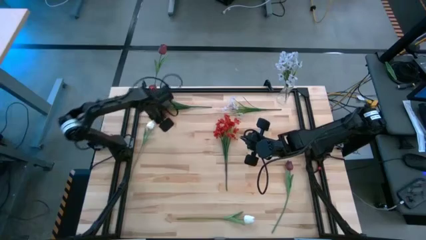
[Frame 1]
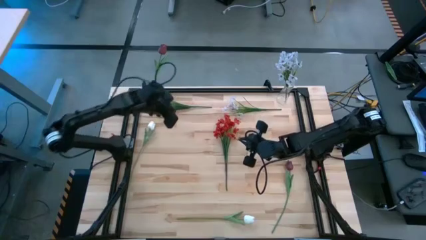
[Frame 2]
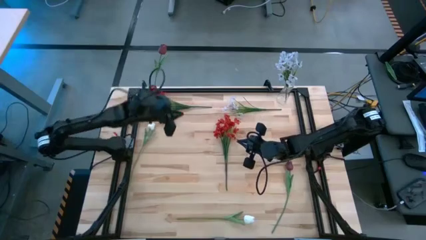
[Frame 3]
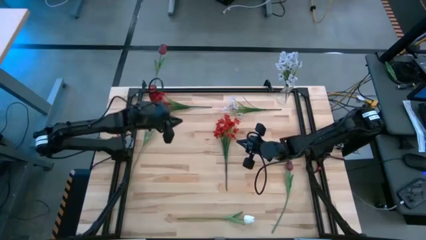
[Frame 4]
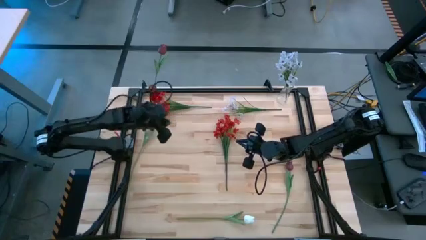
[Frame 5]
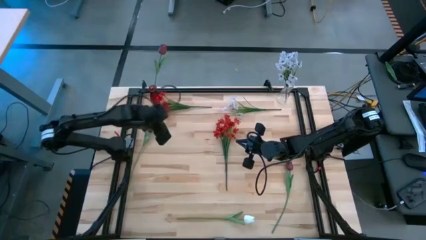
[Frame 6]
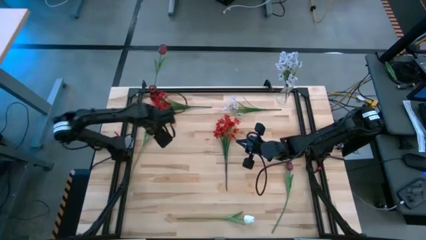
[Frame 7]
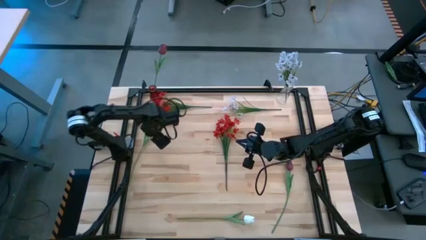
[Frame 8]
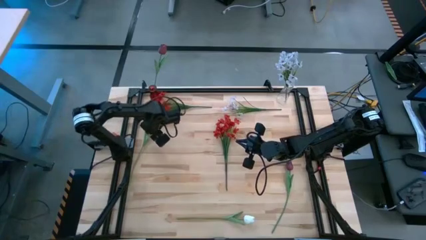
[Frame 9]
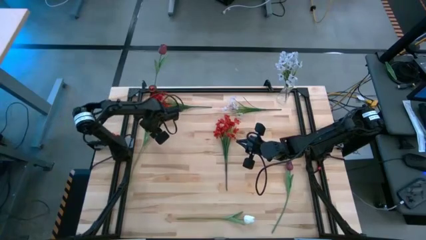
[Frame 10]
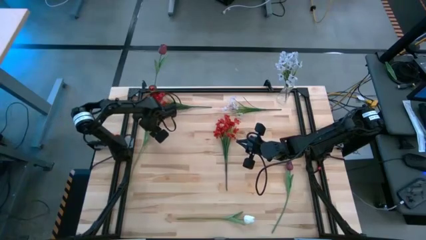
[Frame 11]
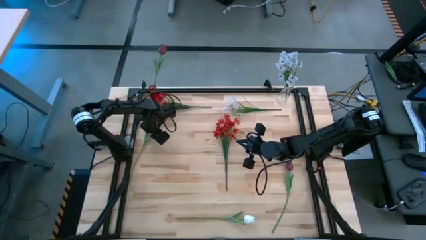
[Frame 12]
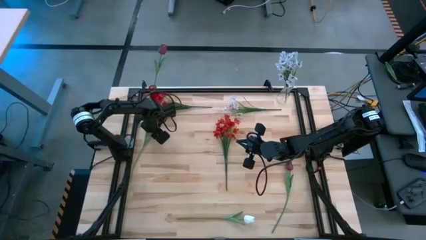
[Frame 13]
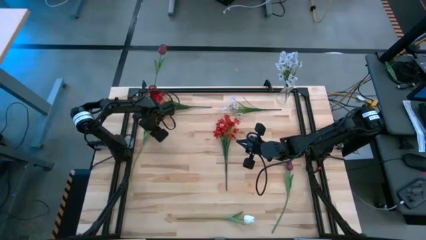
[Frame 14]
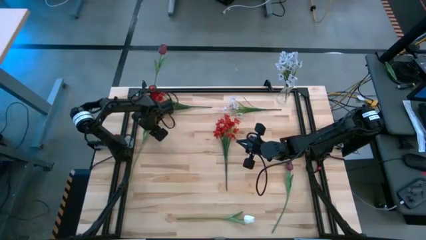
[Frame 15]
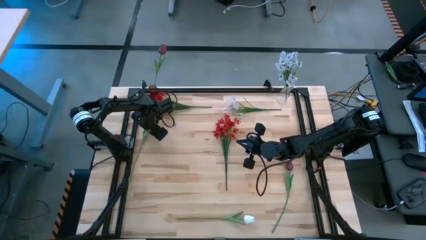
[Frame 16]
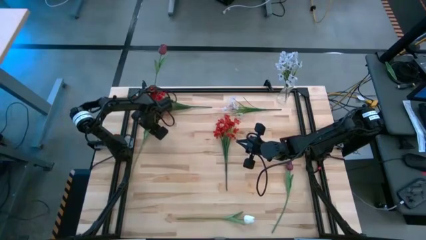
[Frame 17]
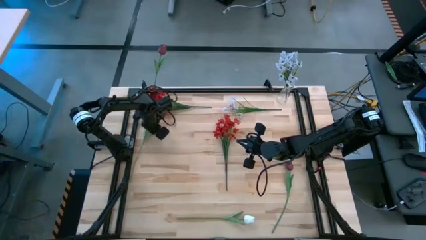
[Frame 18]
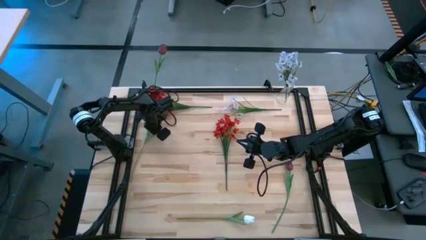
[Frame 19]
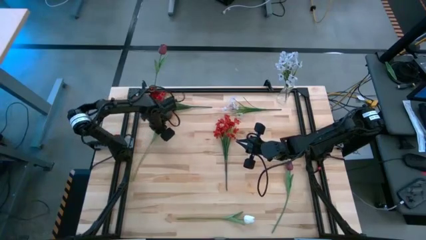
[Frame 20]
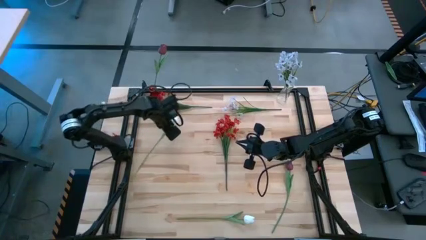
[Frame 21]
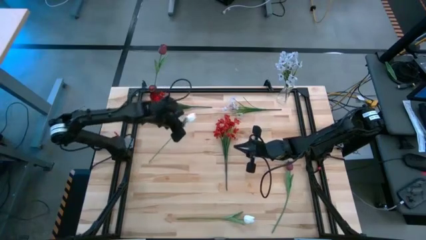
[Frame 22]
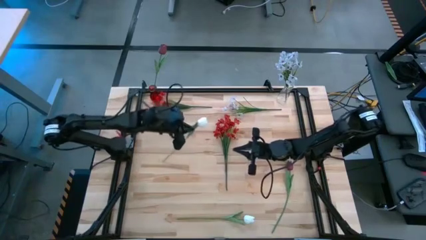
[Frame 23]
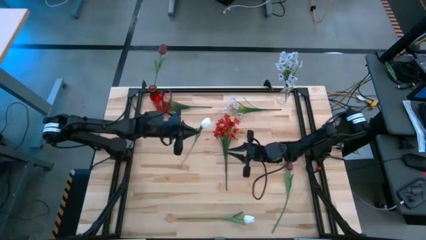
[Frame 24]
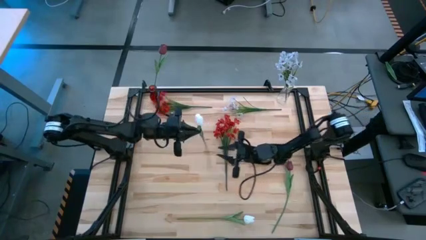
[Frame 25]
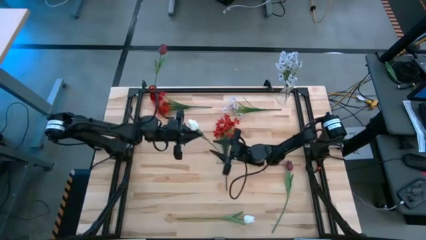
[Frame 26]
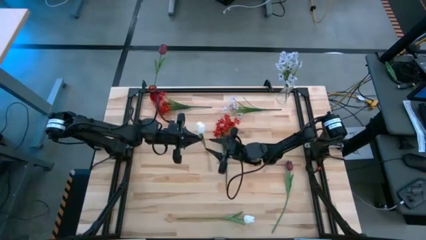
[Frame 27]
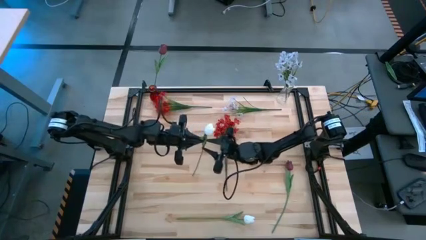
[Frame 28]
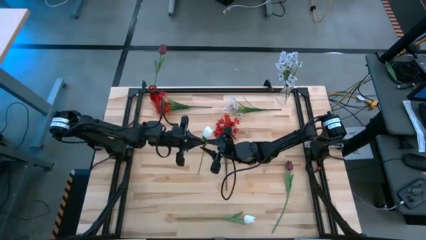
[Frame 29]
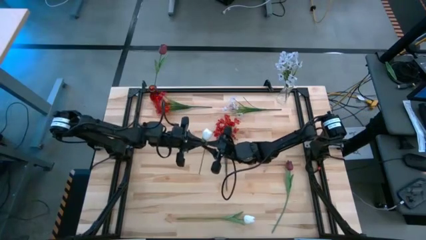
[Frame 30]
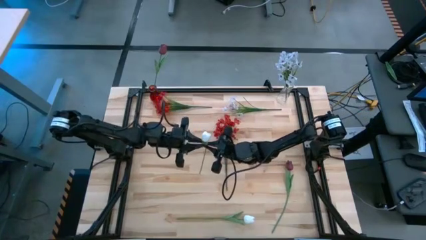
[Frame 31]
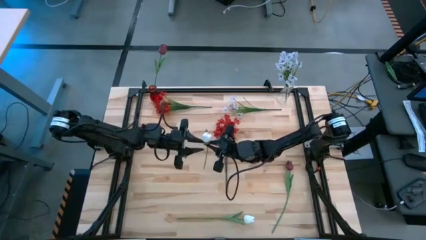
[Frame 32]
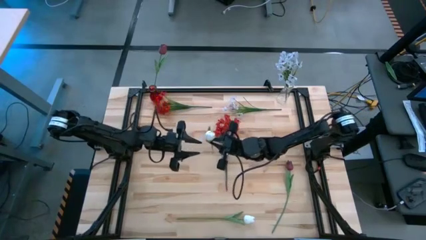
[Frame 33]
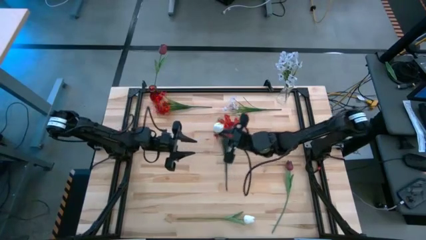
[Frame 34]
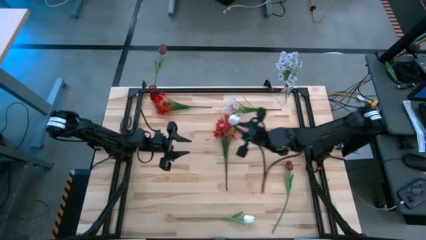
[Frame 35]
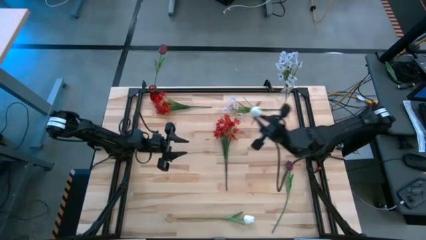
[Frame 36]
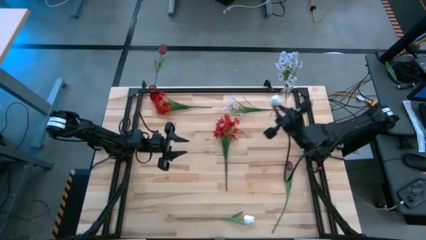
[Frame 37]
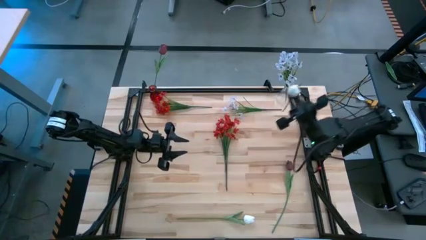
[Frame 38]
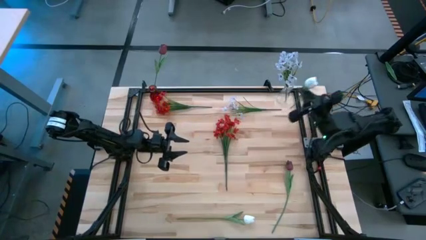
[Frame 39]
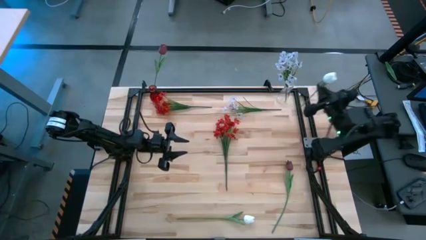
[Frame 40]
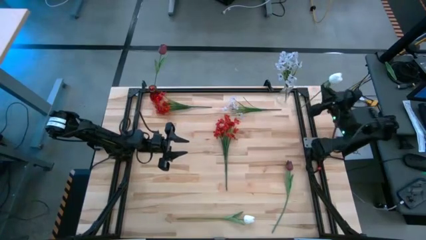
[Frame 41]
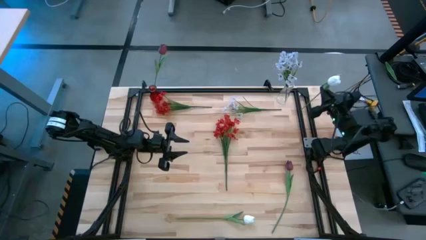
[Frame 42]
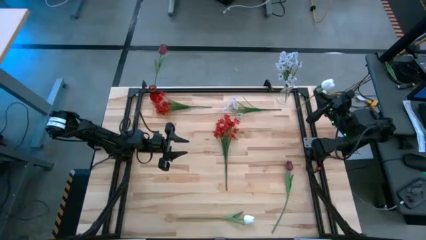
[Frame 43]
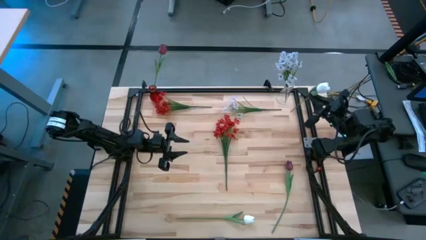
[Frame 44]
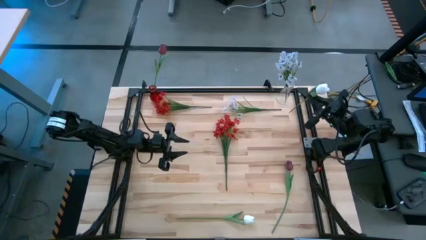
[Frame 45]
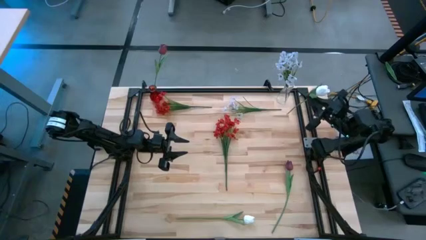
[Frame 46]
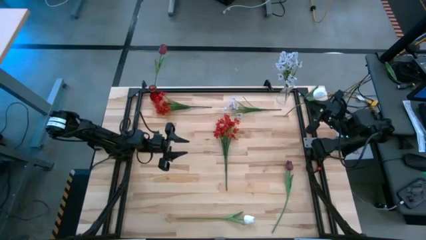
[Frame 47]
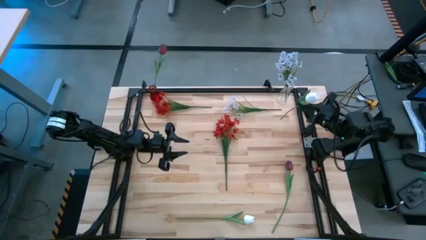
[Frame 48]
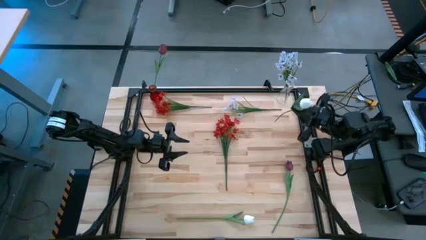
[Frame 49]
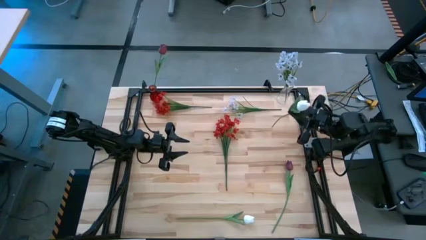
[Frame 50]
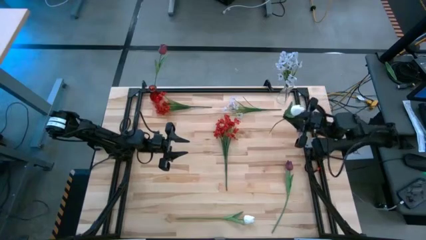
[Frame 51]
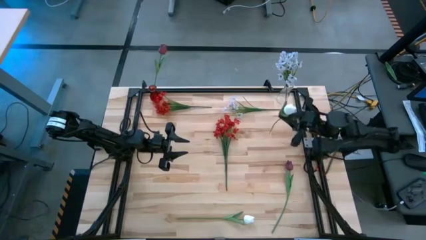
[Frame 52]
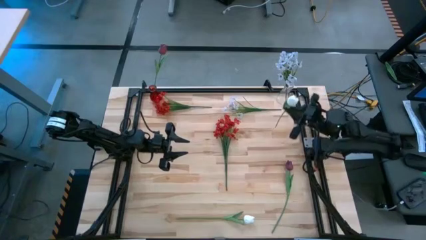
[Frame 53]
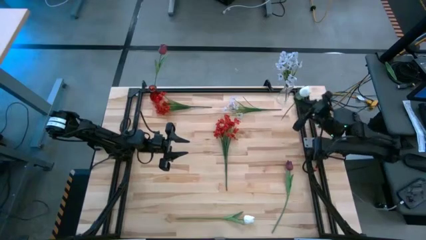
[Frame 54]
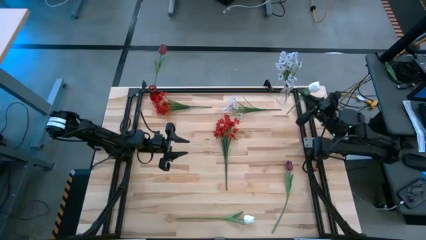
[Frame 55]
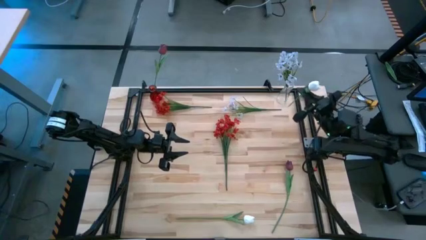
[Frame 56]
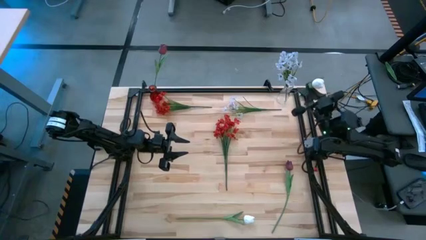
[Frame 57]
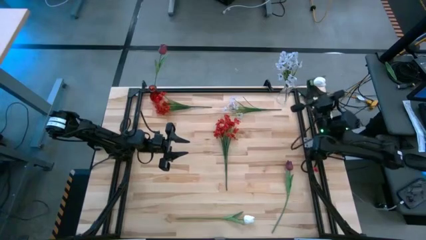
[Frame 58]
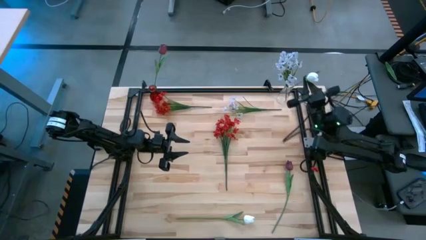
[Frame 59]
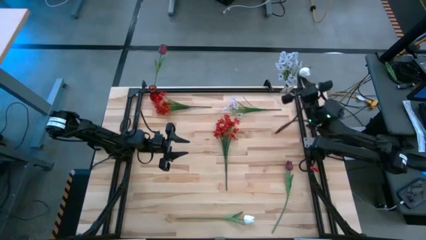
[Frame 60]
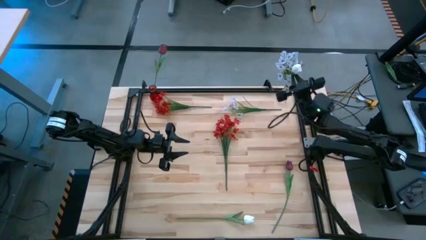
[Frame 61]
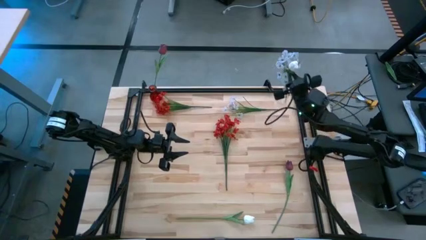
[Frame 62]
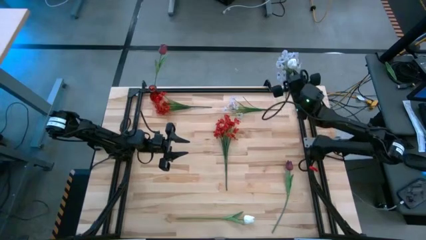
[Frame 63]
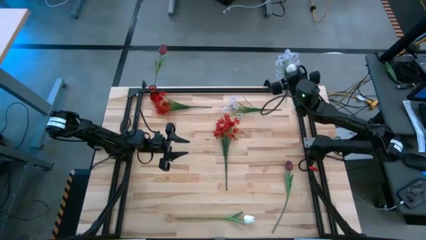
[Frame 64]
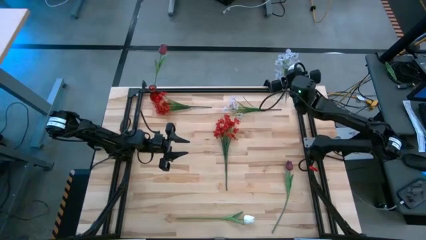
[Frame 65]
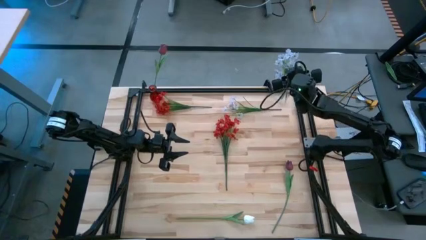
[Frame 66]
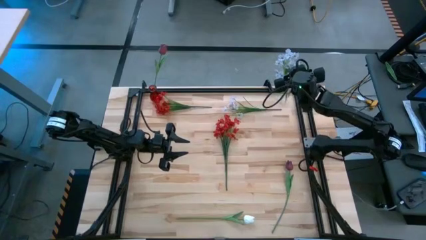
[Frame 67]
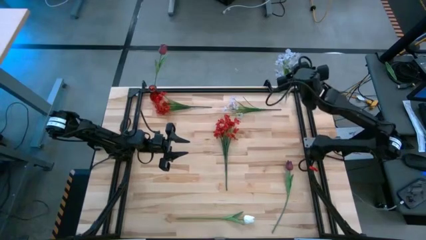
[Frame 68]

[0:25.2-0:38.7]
Task: Sort flowers into vase by color
Put the top white tulip into the transparent flower vase
